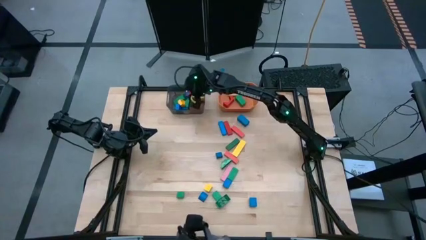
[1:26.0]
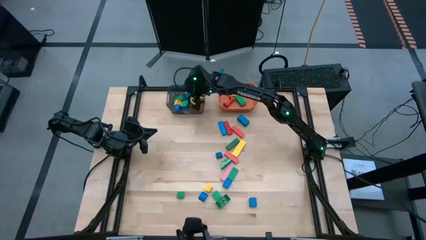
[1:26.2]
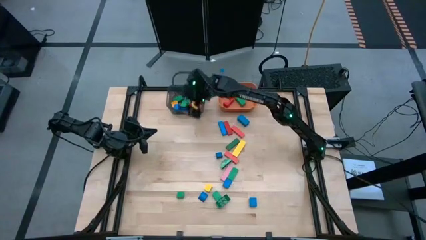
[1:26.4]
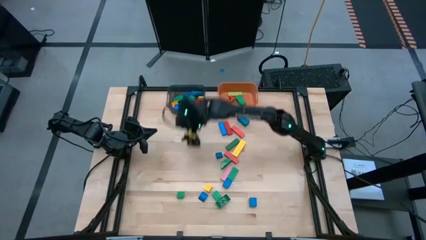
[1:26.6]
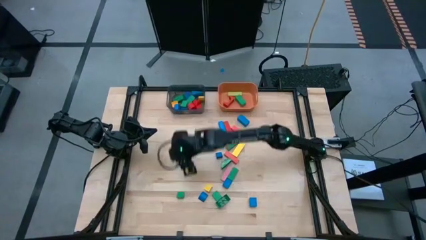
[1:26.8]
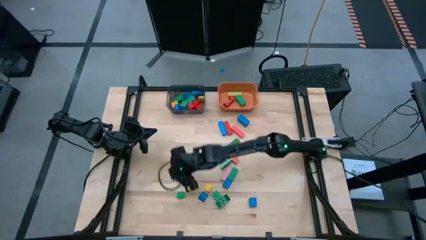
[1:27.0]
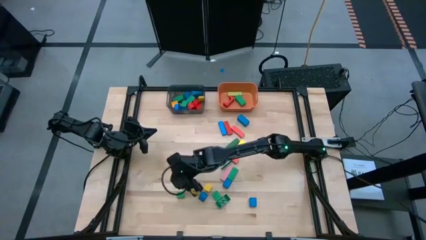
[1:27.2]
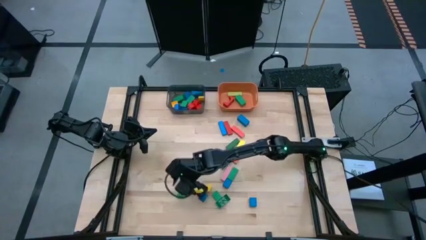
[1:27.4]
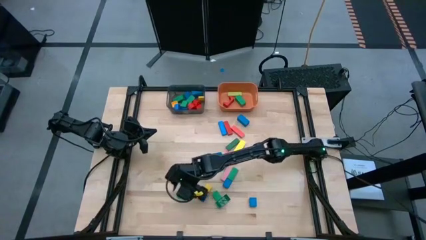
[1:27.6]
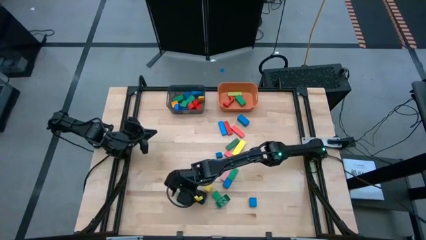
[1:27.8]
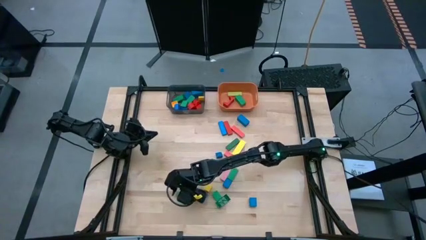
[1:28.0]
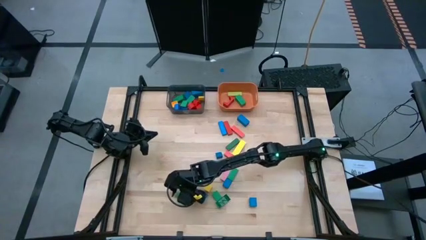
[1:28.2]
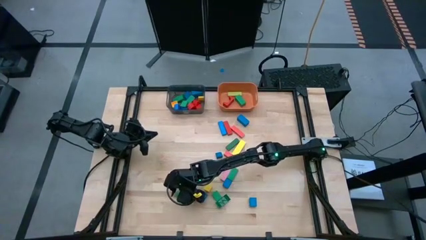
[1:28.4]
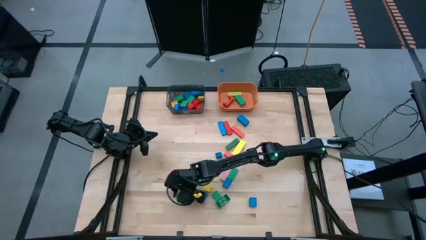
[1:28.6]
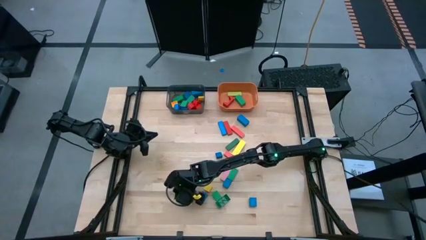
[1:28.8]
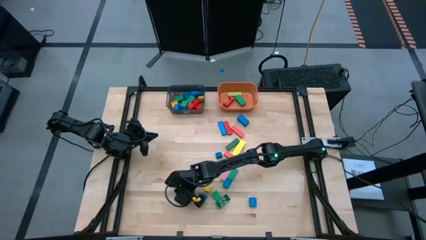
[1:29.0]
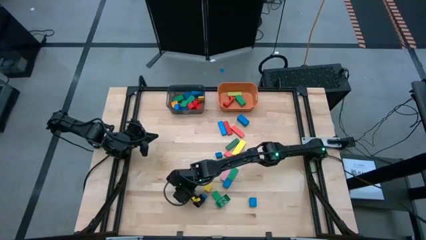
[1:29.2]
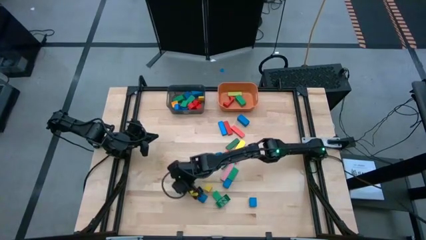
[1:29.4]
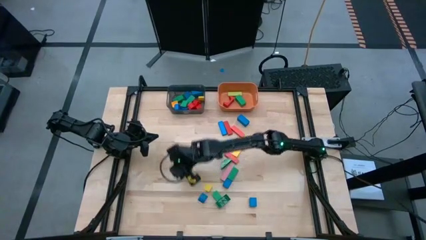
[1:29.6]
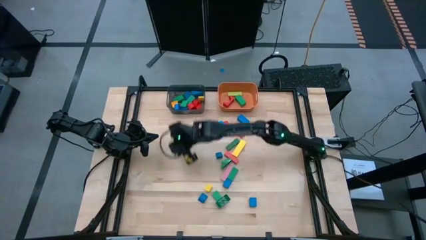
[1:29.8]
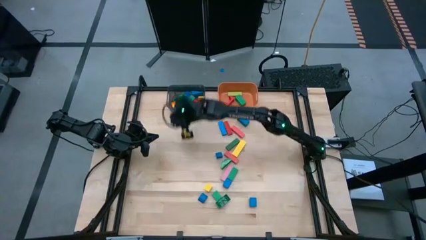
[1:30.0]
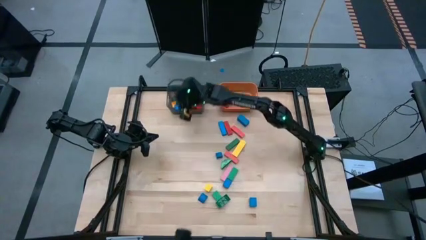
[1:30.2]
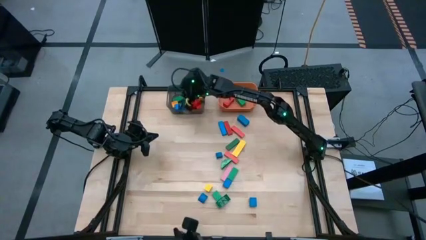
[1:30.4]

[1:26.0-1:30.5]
Task: Sort blocks by size
Put the small green block into the black bin

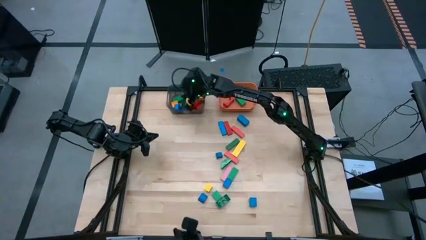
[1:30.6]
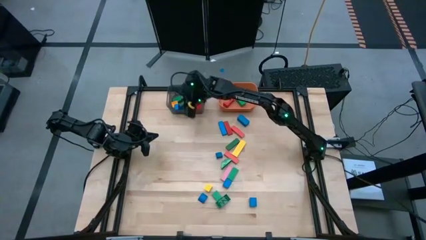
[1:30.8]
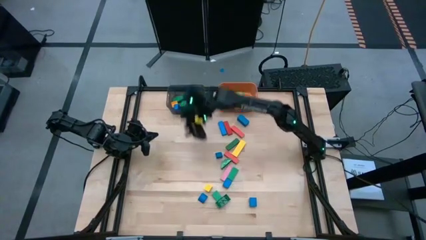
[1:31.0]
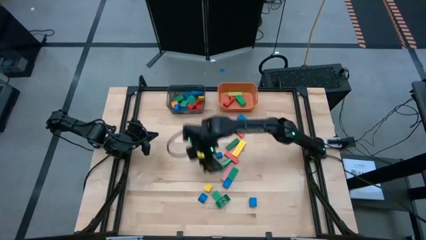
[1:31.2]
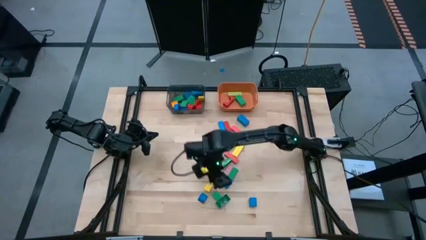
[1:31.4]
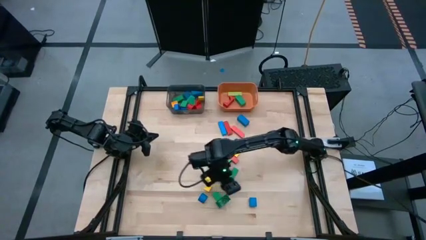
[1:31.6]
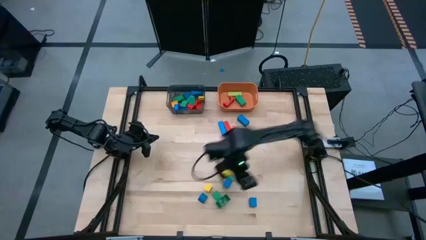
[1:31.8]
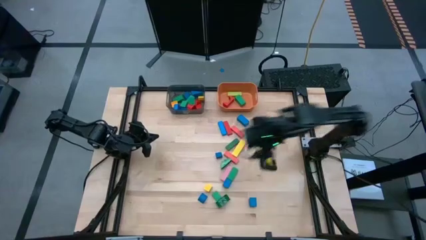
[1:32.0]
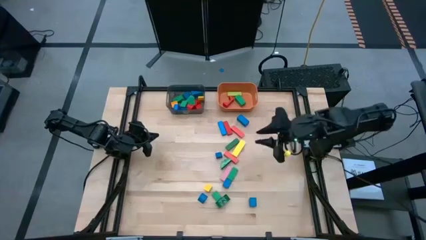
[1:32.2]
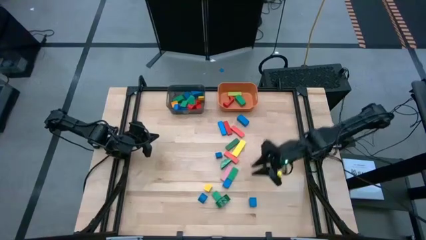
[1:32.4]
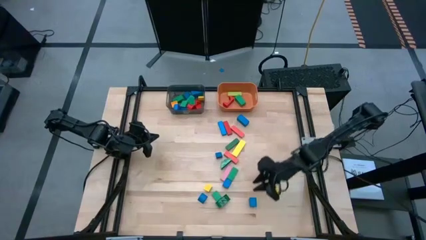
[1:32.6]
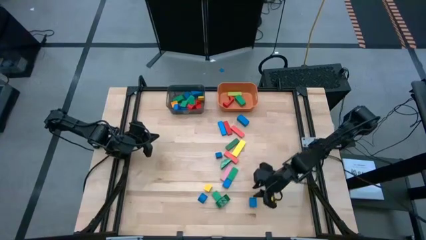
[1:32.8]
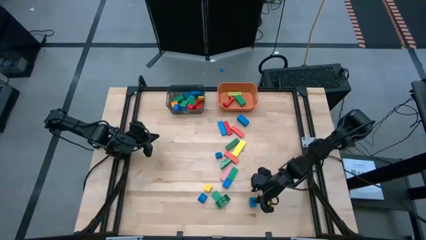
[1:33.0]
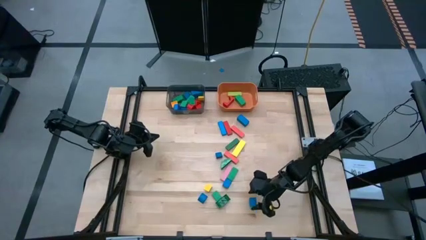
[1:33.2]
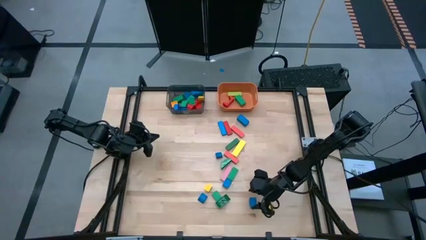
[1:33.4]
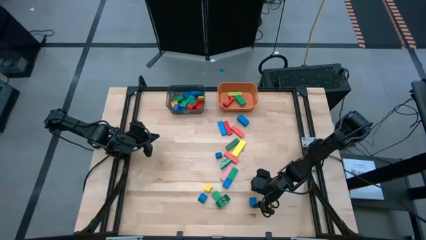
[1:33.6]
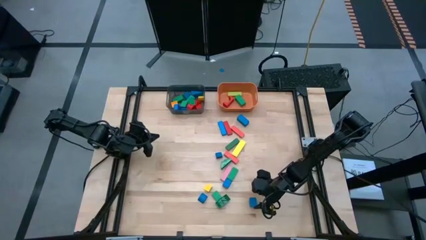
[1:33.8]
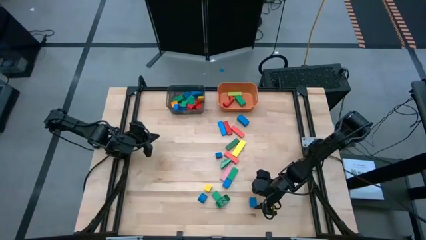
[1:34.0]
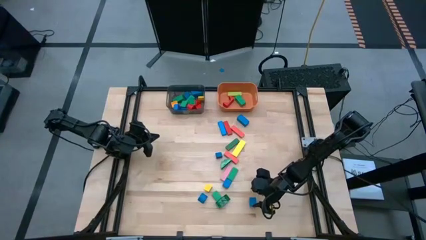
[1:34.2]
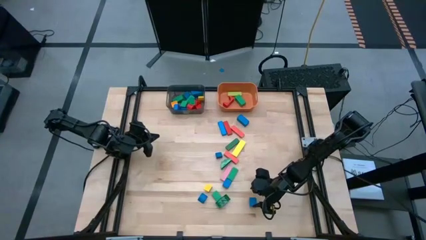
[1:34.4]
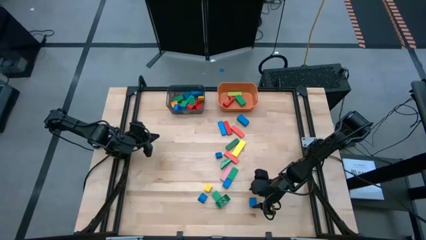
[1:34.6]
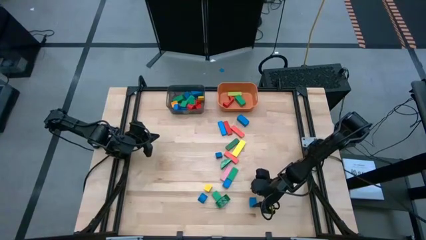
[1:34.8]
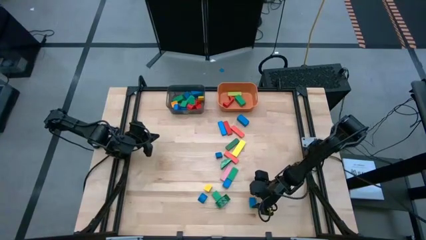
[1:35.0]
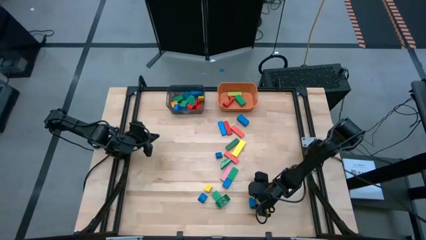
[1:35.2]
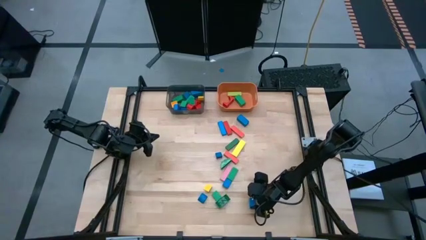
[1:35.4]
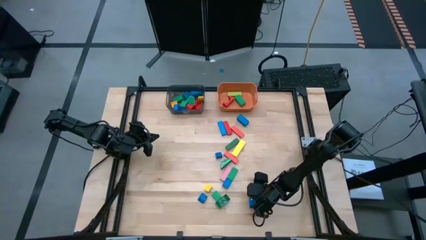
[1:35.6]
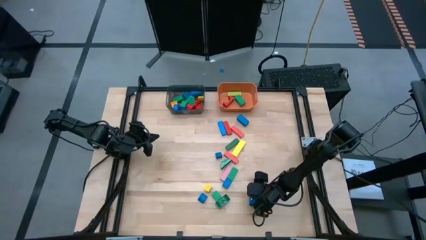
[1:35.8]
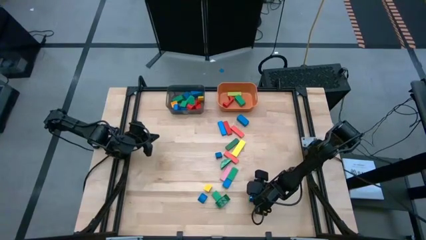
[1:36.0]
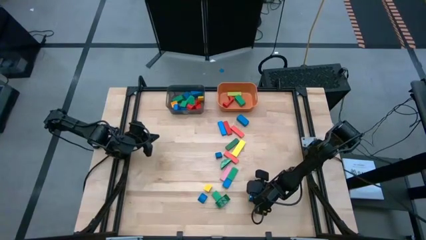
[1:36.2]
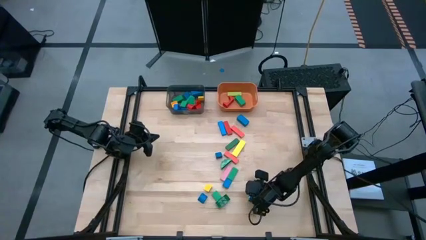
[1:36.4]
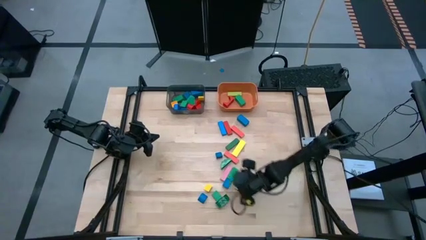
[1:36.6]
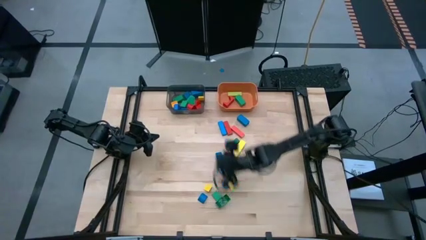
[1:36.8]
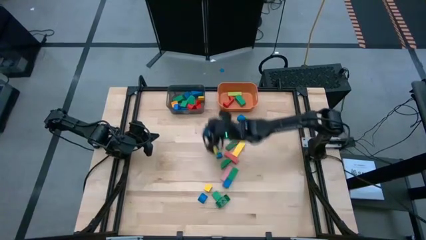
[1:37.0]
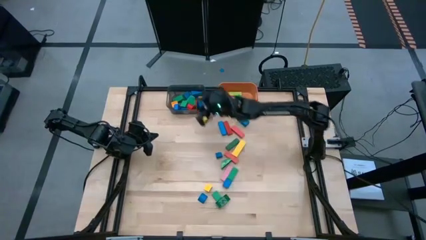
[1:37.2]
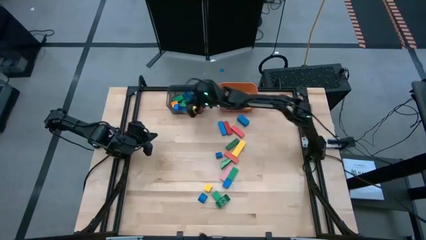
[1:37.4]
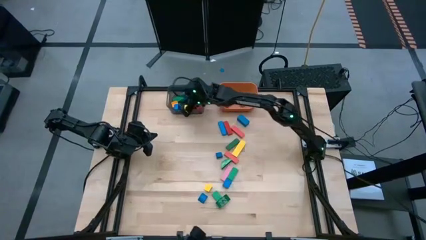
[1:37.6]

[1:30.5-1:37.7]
Put the small blue block into the black bin

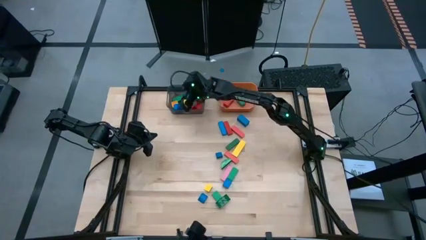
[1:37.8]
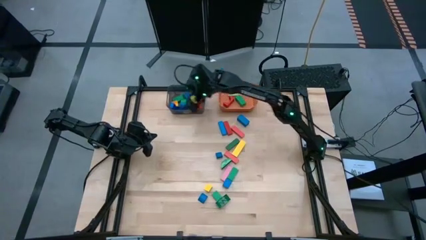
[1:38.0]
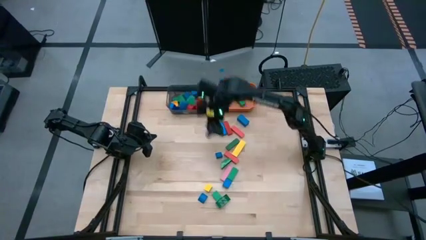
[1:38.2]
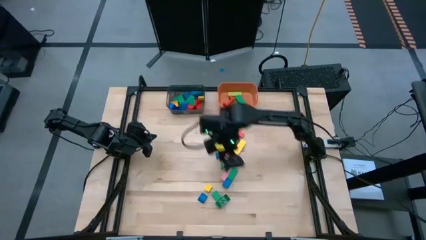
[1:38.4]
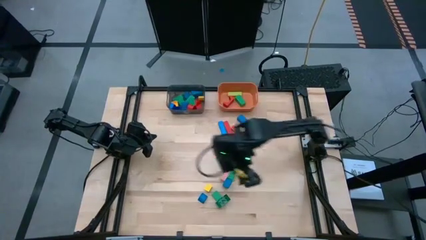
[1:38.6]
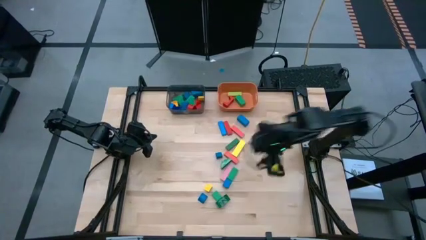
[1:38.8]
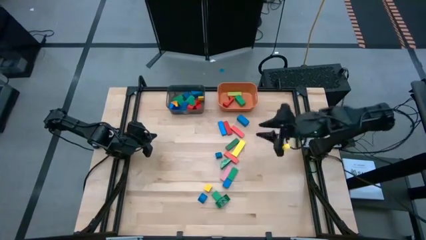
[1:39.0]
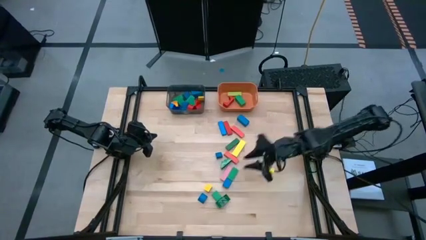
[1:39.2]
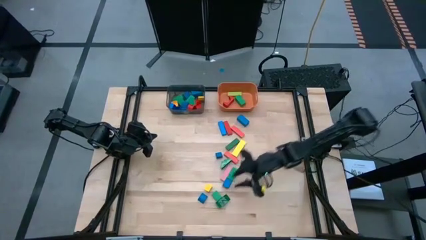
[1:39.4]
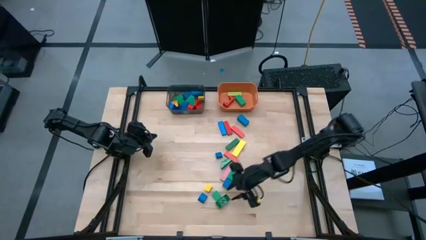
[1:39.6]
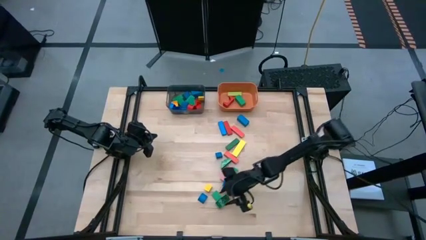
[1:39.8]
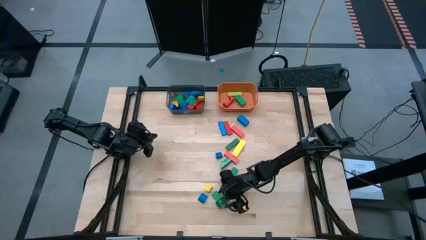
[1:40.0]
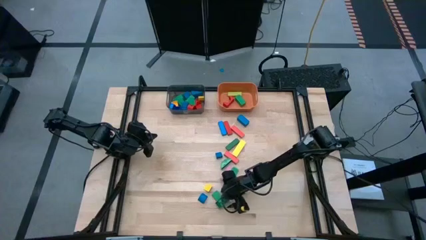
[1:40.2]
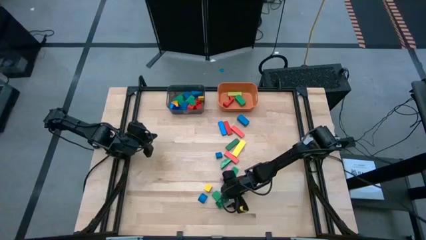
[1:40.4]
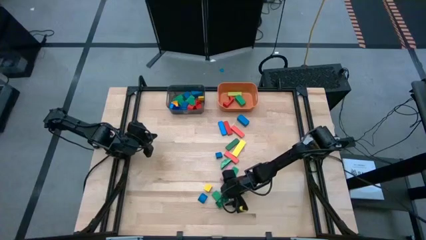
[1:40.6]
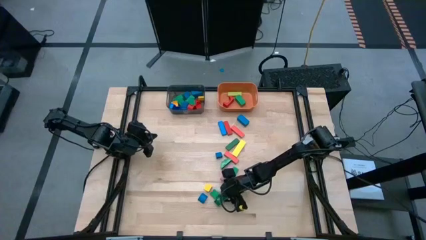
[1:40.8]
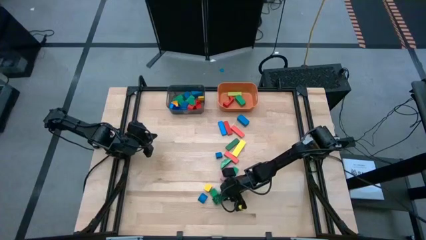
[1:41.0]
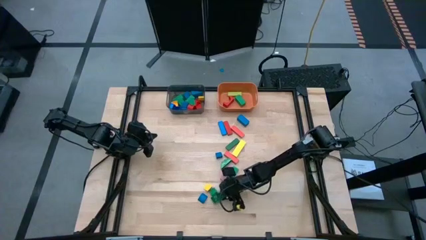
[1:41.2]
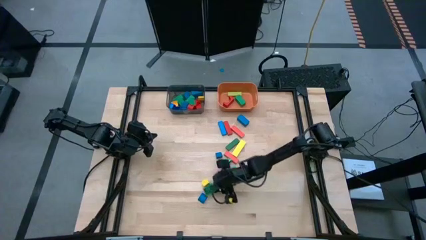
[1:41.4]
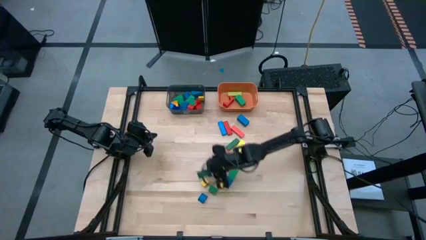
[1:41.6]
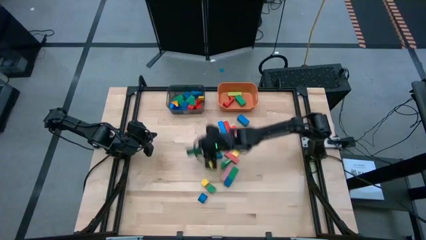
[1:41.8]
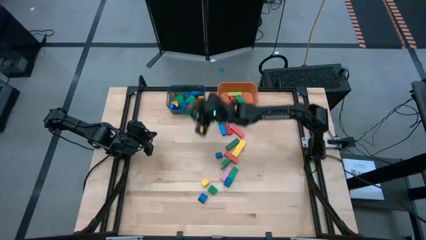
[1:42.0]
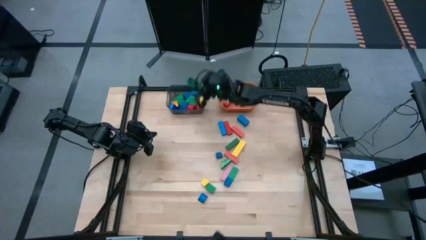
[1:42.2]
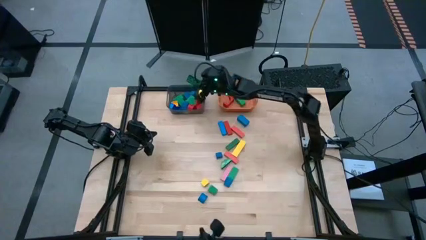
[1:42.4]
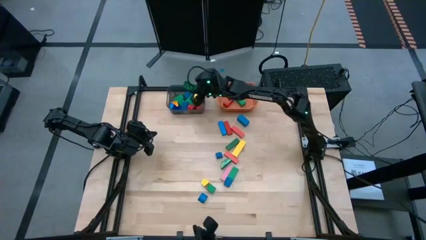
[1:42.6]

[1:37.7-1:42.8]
Put the small green game piece into the black bin
